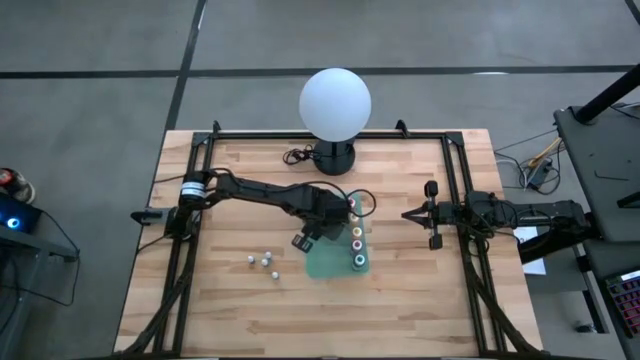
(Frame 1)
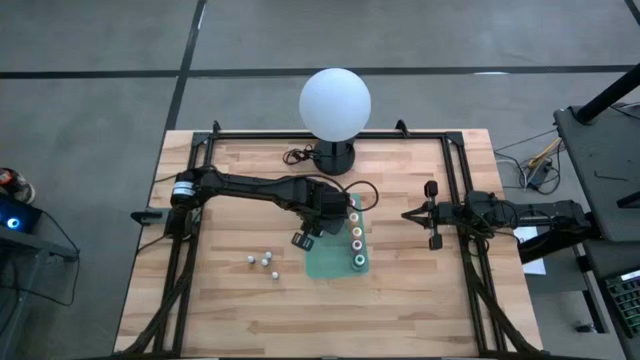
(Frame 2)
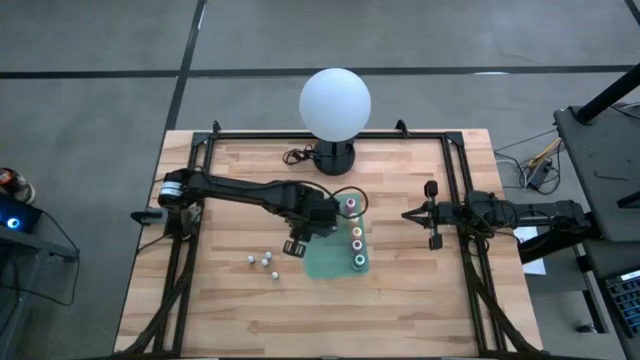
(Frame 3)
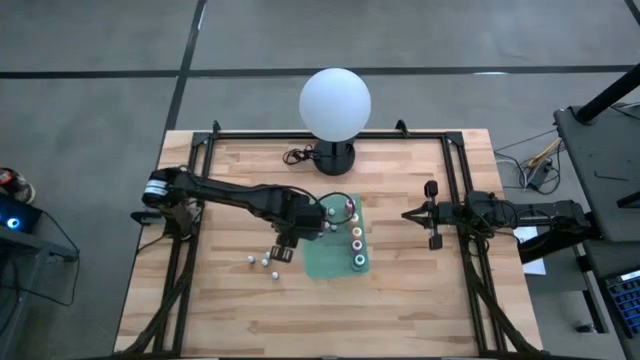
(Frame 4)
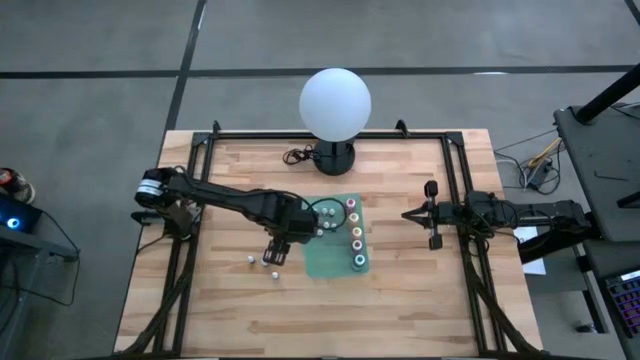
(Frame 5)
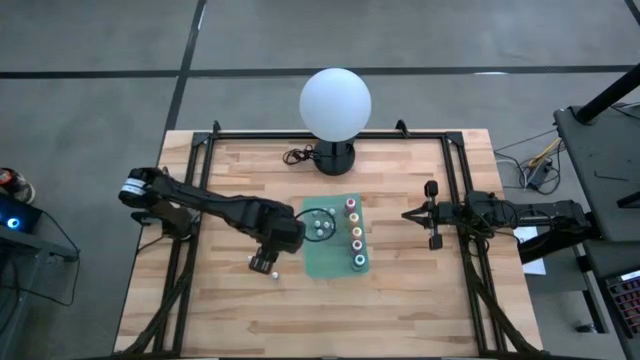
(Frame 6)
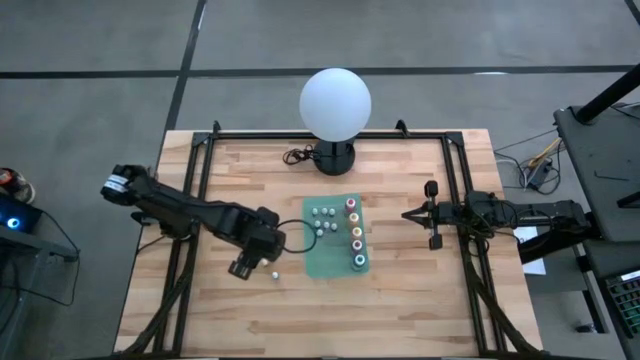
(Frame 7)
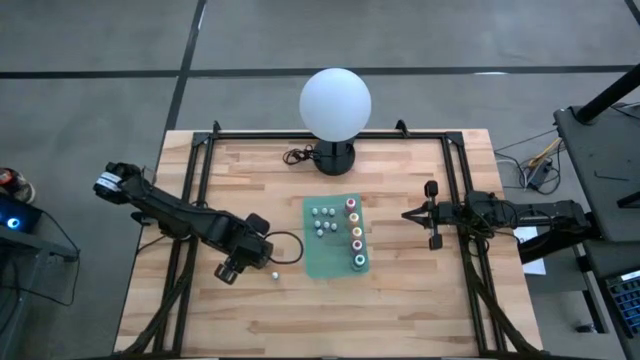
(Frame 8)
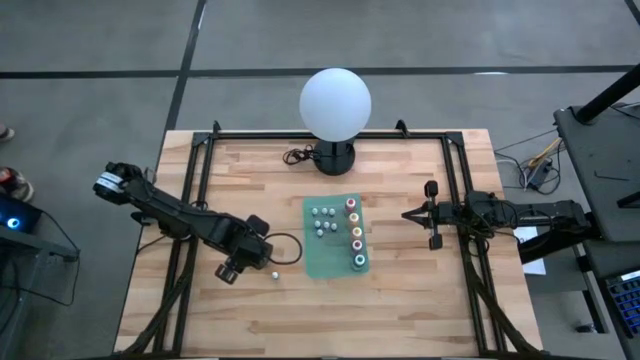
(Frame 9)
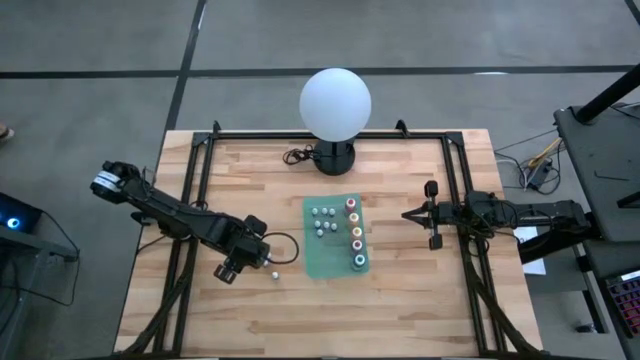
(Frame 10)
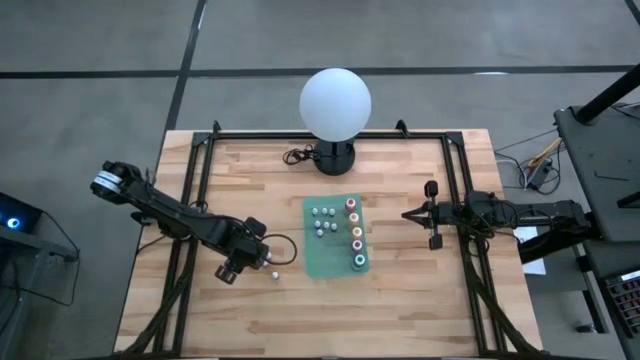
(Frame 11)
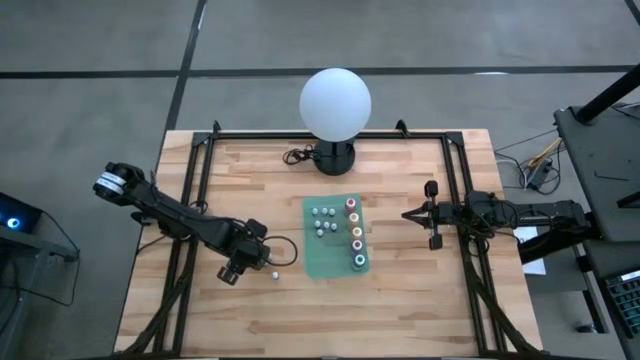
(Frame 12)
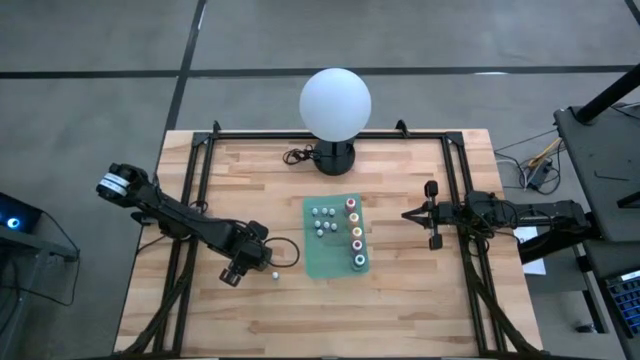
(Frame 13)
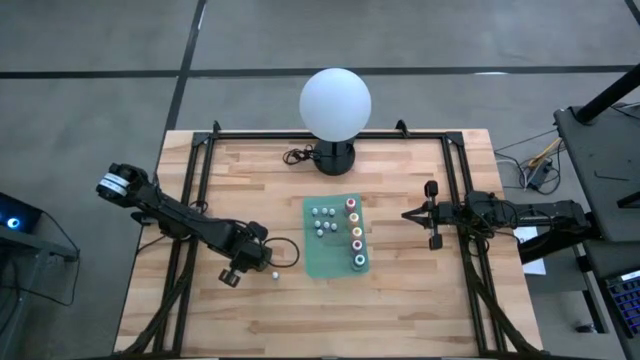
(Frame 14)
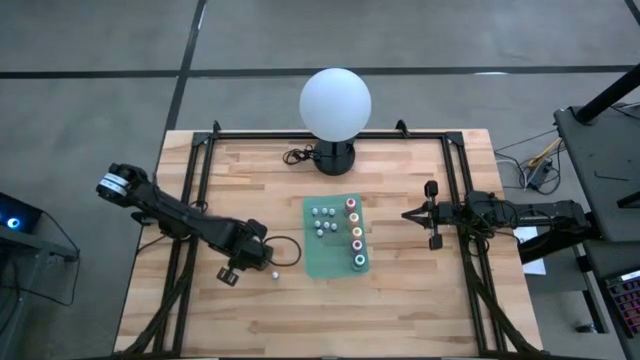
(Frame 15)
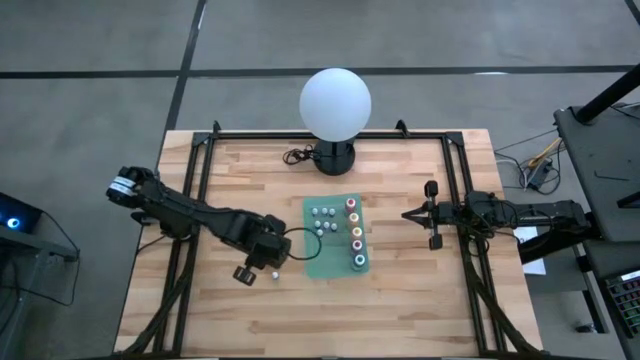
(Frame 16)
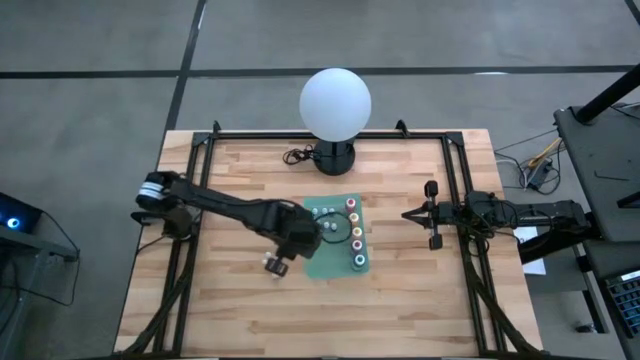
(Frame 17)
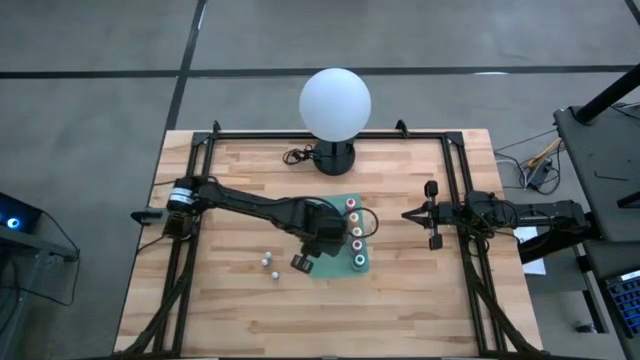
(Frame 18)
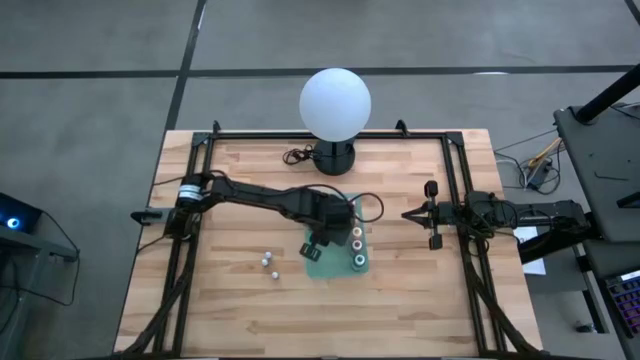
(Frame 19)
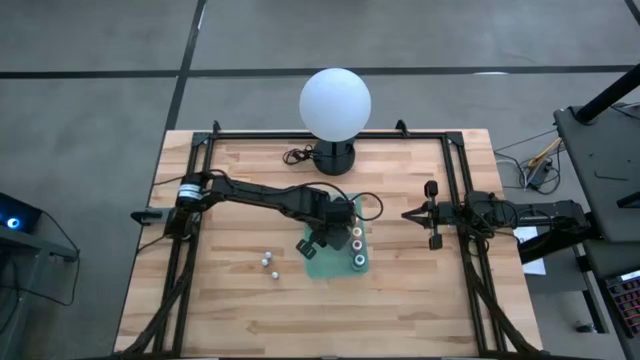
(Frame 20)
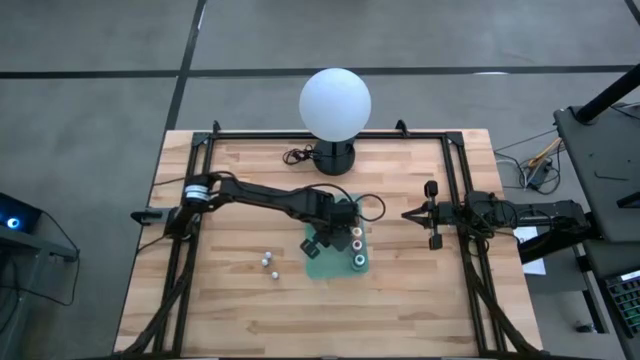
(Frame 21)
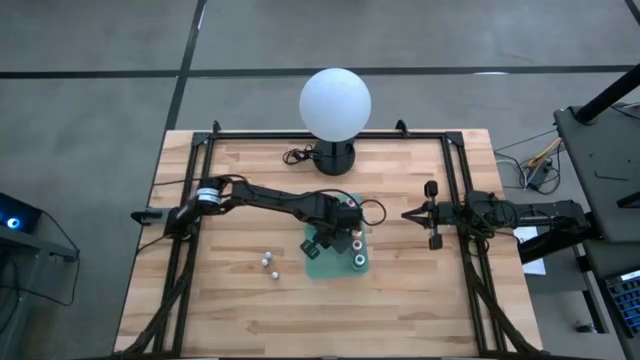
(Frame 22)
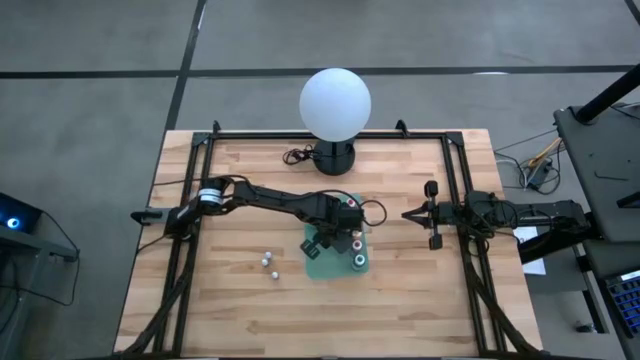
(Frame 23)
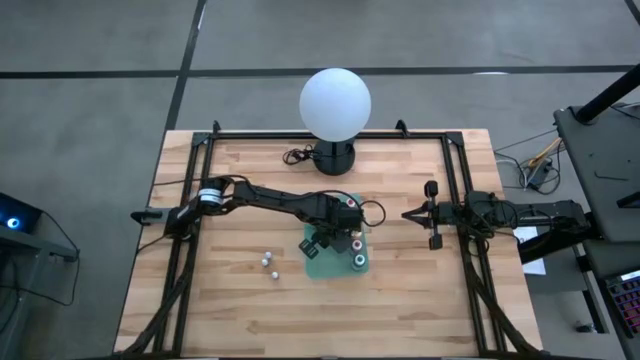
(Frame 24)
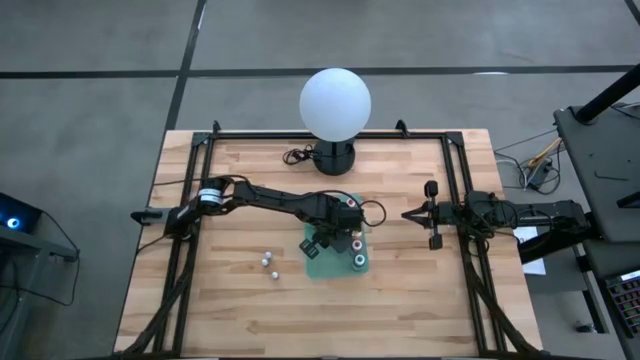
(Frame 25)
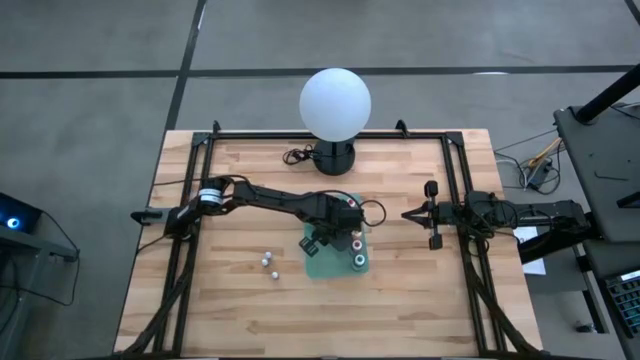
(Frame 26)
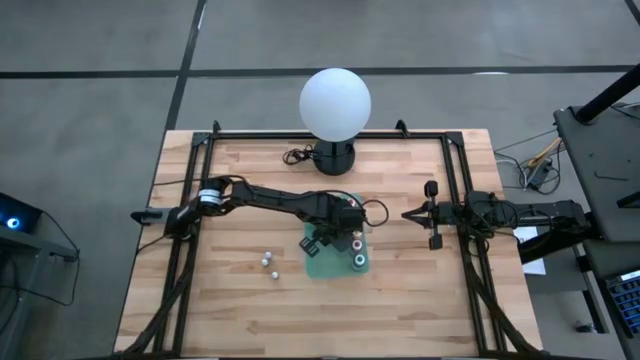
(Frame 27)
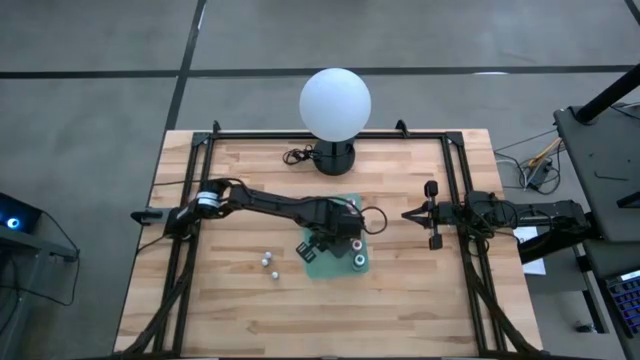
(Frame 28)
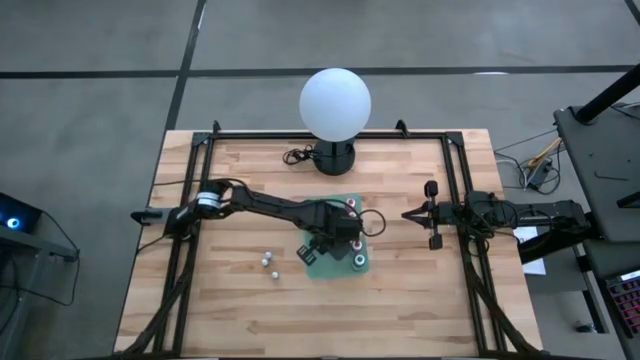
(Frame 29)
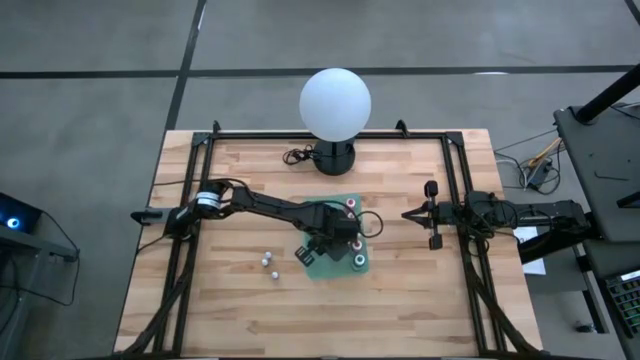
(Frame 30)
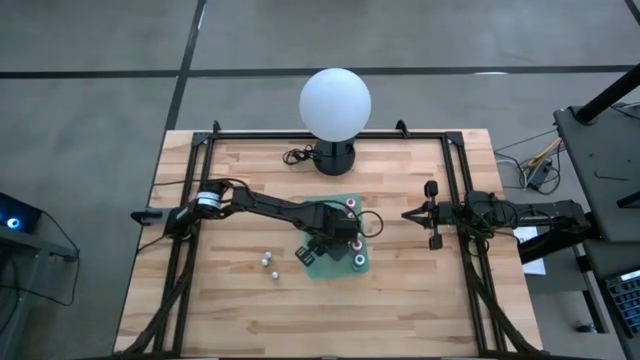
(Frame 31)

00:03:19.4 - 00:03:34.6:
Task: Pick & Place food coloring
Put the left small blue food coloring bottle into the green bin

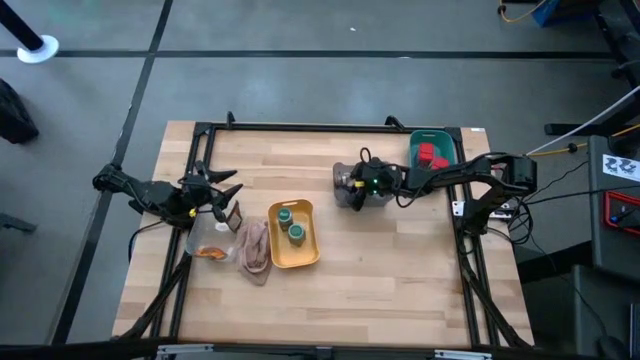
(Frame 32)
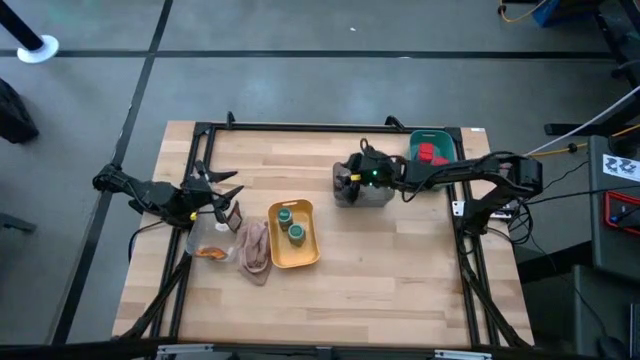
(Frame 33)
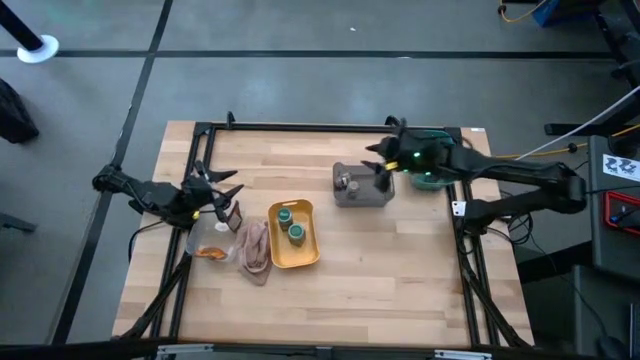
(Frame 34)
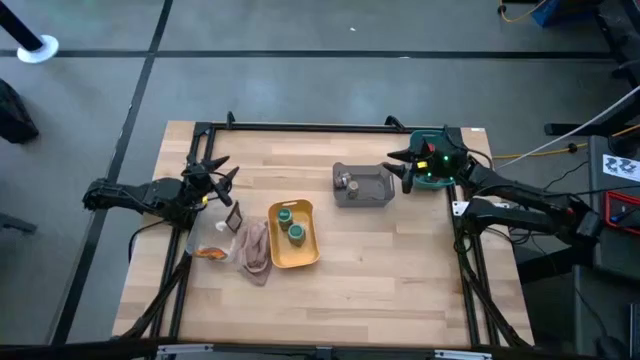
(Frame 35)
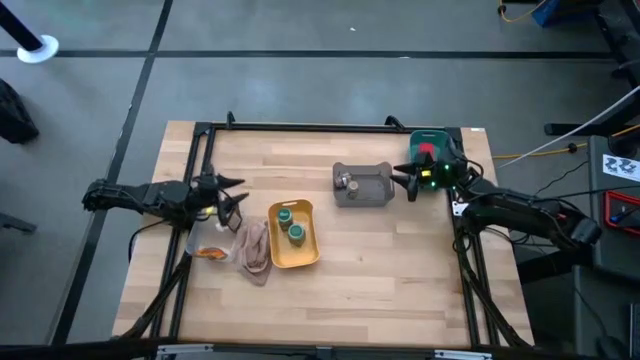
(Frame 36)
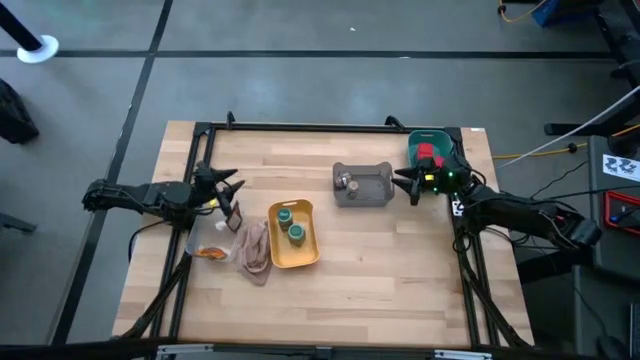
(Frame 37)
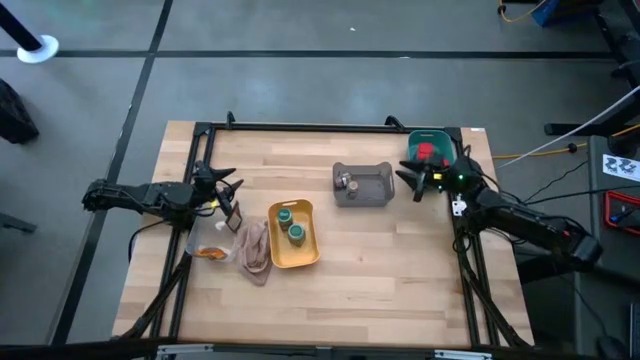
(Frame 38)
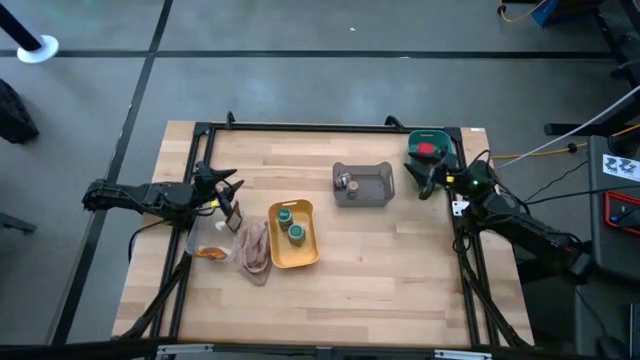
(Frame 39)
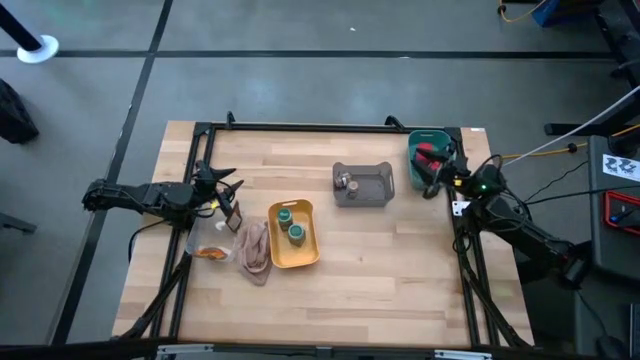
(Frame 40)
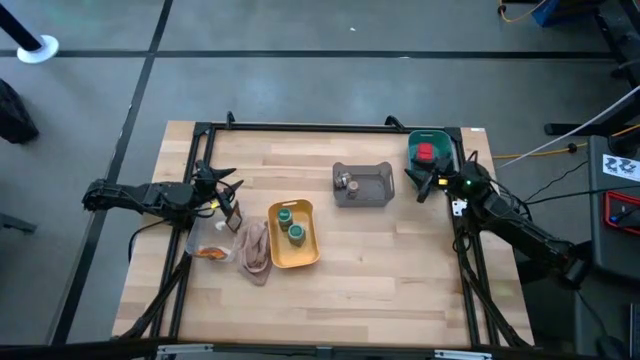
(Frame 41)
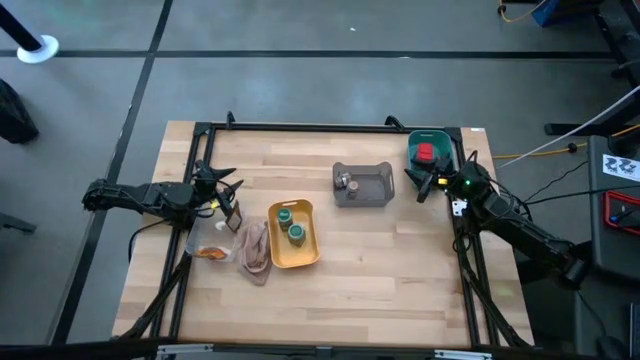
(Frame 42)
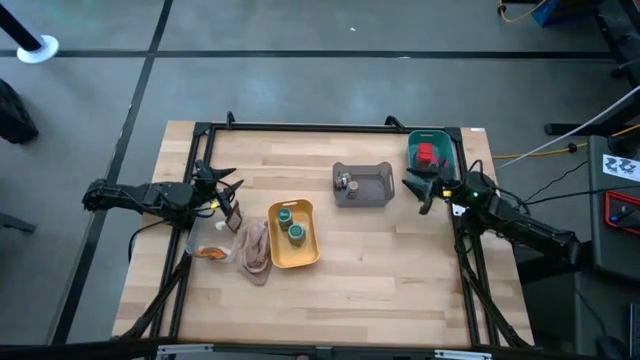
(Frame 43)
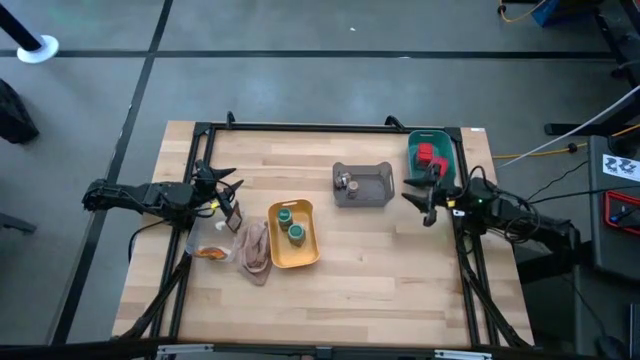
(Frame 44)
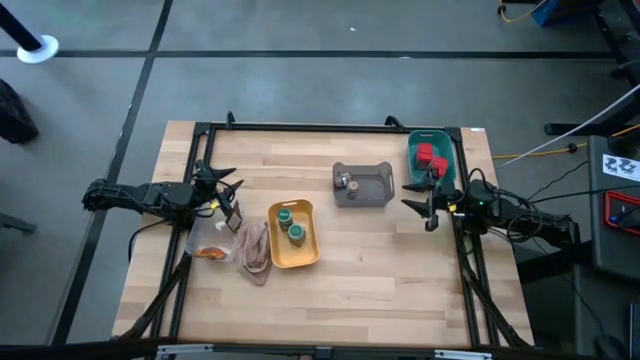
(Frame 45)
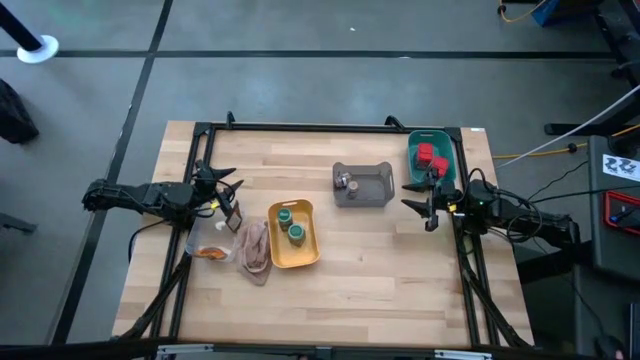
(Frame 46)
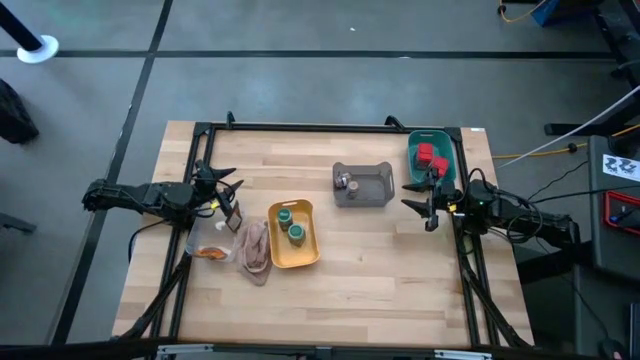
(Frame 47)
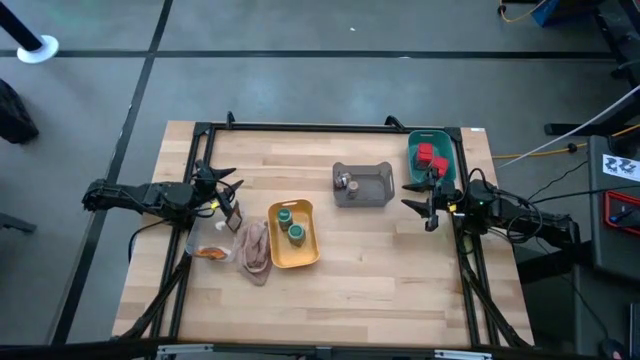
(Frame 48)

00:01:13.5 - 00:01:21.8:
Task: Sort spices by type
Return to Home Position
